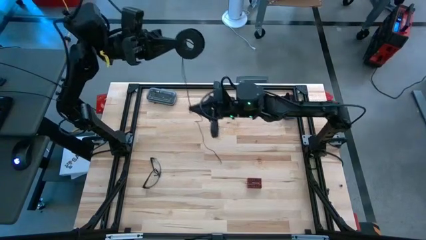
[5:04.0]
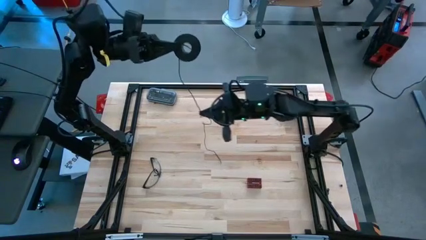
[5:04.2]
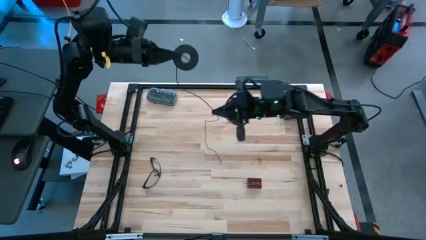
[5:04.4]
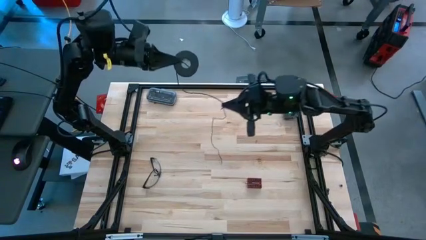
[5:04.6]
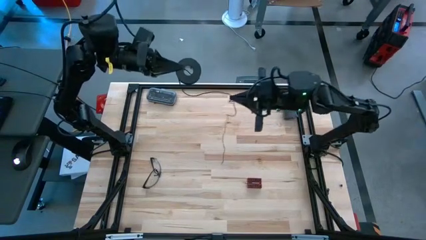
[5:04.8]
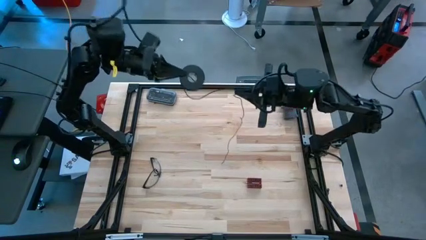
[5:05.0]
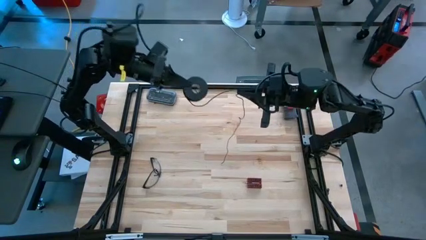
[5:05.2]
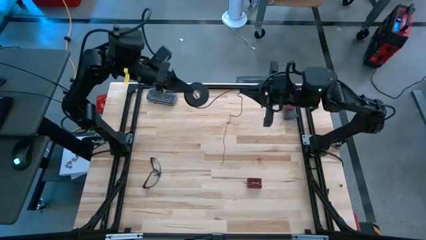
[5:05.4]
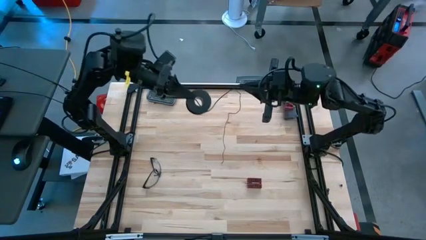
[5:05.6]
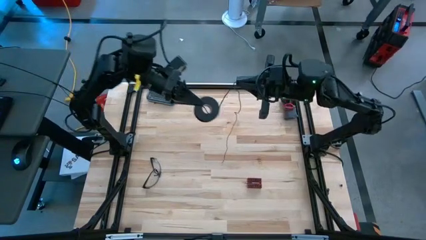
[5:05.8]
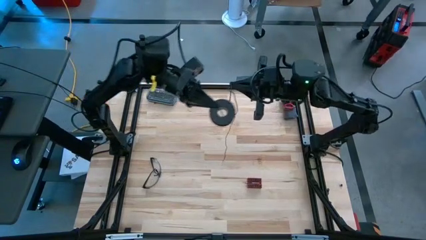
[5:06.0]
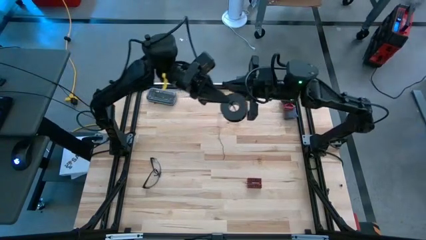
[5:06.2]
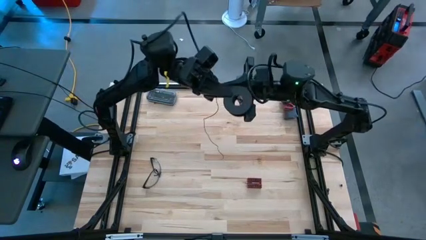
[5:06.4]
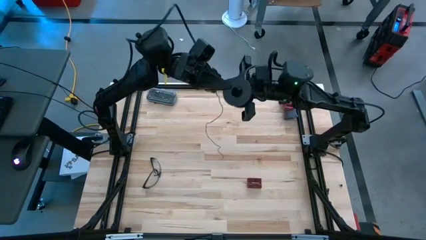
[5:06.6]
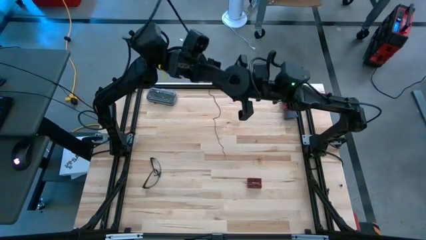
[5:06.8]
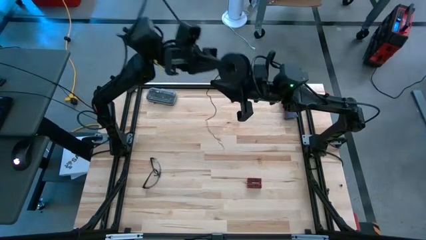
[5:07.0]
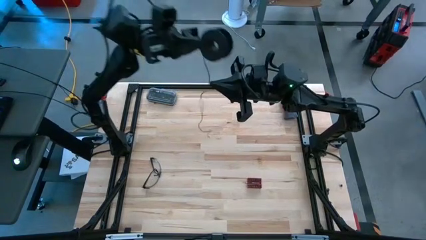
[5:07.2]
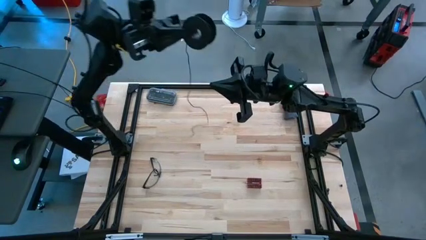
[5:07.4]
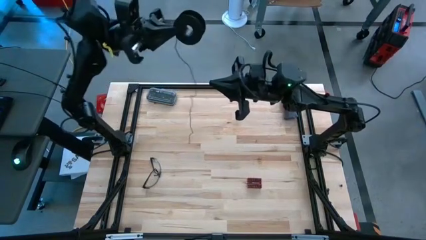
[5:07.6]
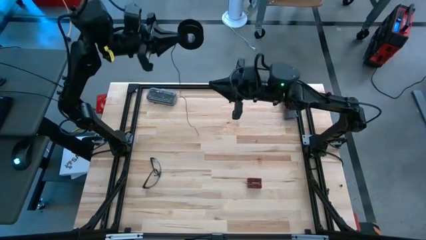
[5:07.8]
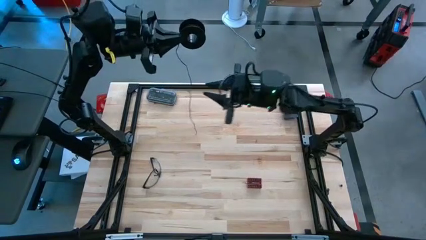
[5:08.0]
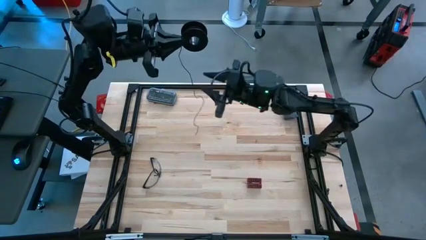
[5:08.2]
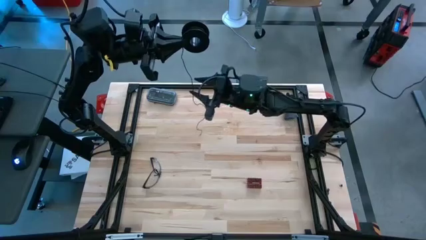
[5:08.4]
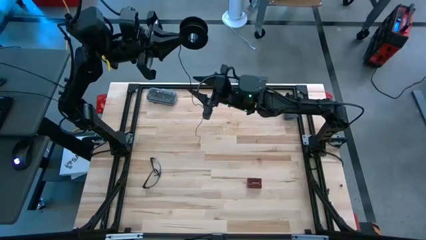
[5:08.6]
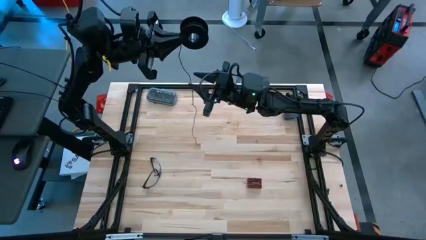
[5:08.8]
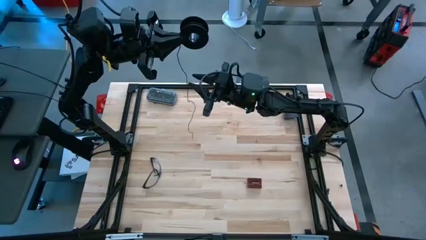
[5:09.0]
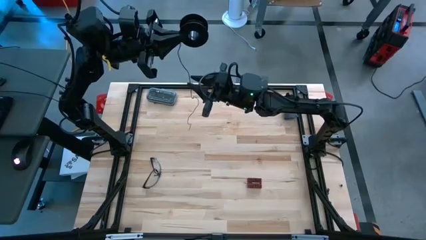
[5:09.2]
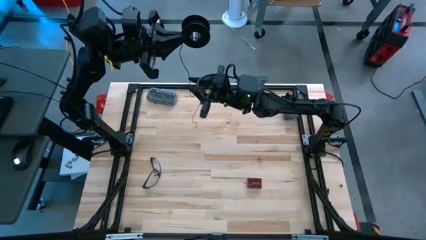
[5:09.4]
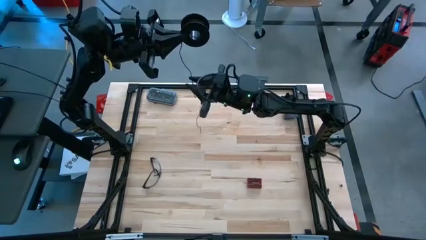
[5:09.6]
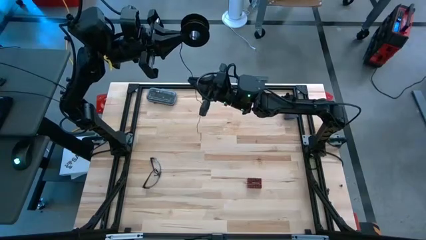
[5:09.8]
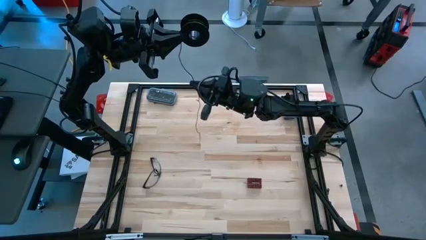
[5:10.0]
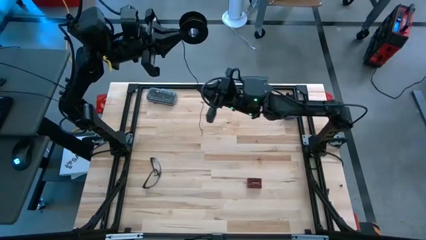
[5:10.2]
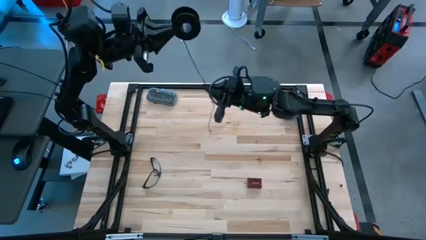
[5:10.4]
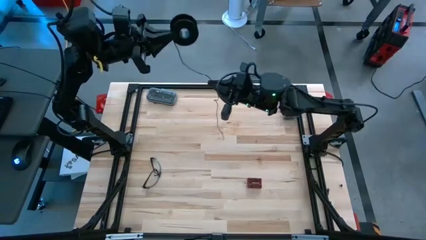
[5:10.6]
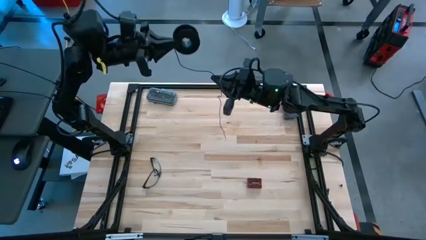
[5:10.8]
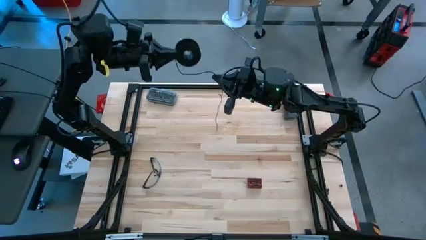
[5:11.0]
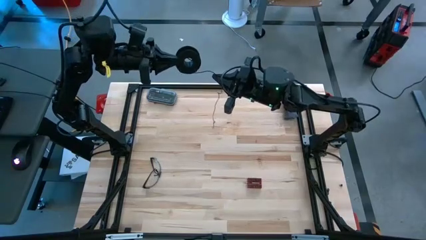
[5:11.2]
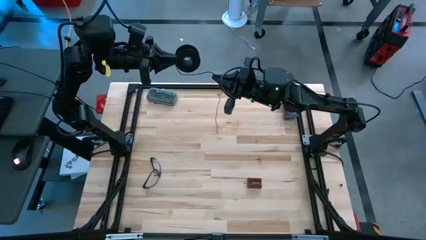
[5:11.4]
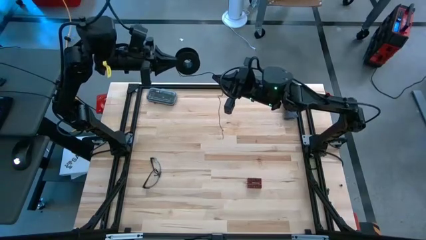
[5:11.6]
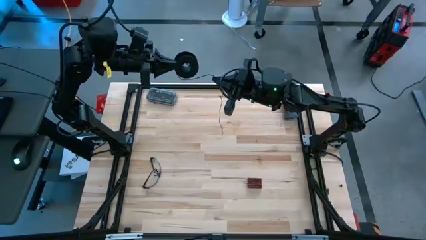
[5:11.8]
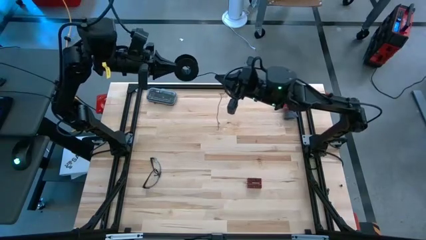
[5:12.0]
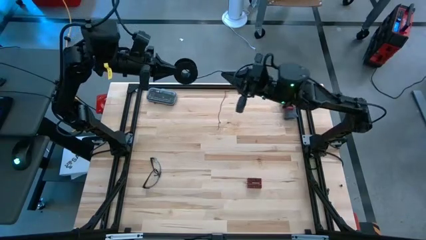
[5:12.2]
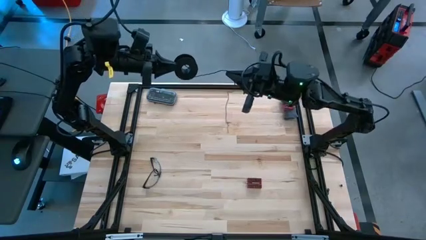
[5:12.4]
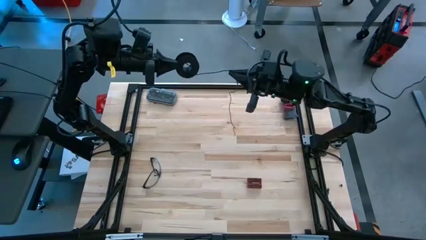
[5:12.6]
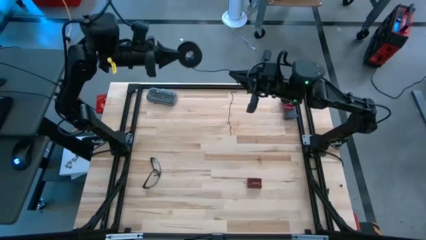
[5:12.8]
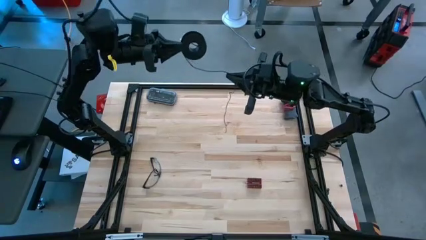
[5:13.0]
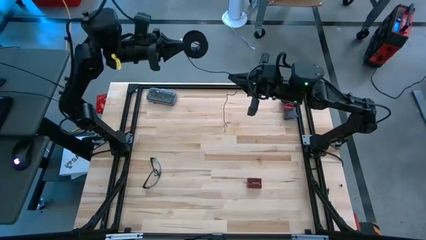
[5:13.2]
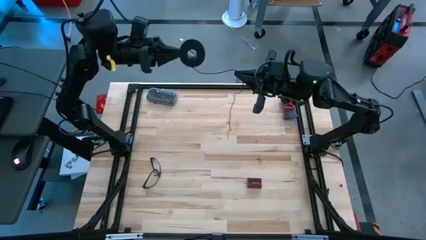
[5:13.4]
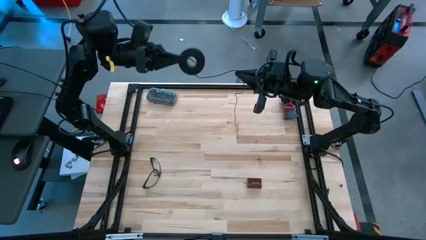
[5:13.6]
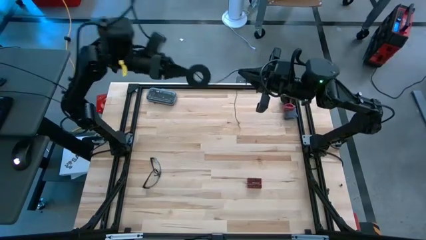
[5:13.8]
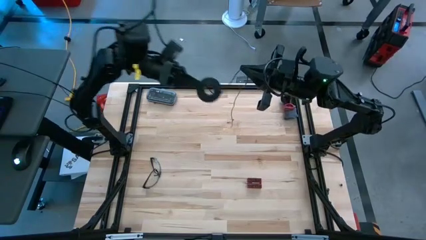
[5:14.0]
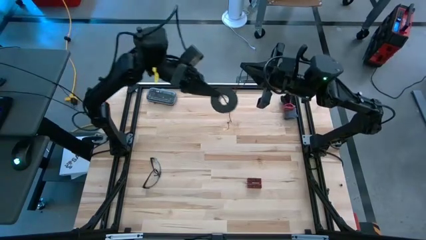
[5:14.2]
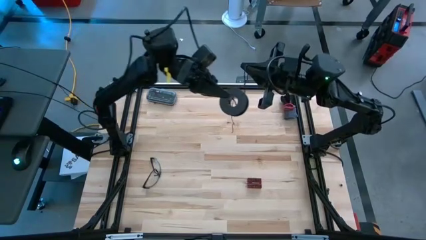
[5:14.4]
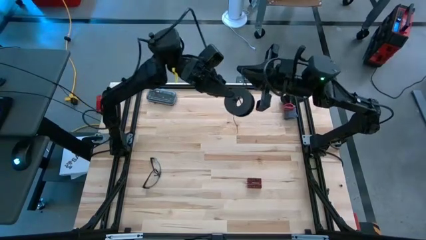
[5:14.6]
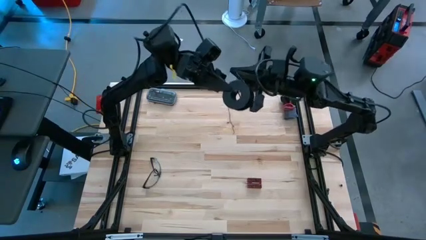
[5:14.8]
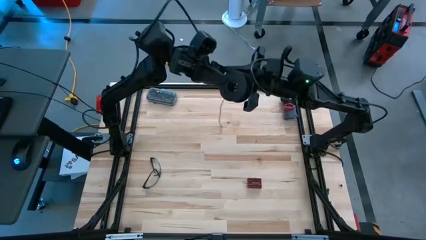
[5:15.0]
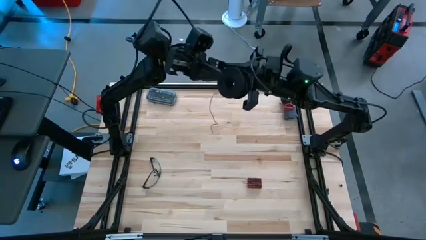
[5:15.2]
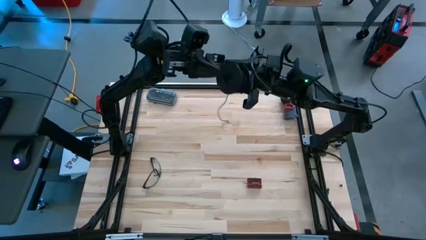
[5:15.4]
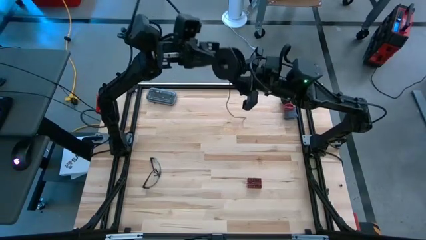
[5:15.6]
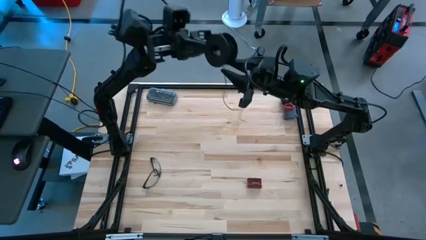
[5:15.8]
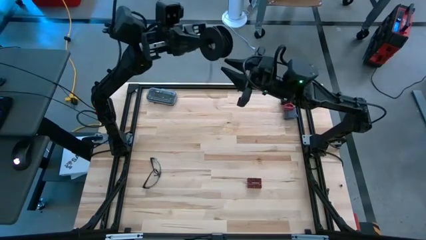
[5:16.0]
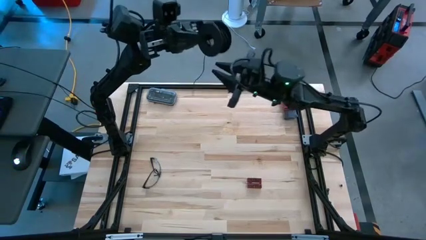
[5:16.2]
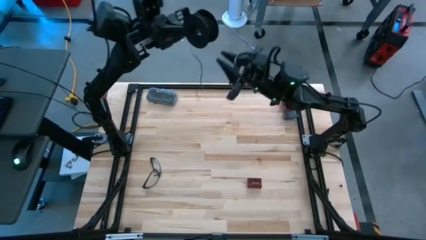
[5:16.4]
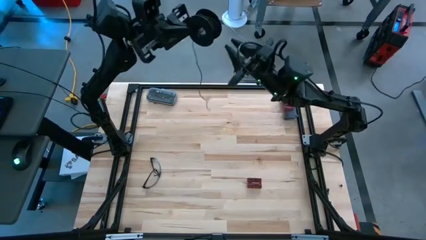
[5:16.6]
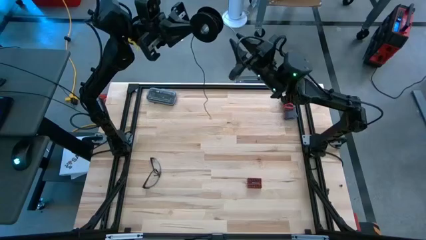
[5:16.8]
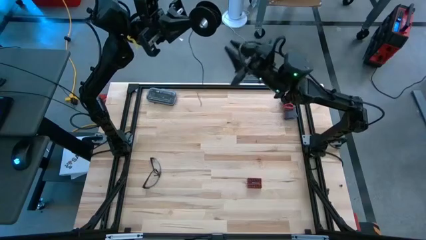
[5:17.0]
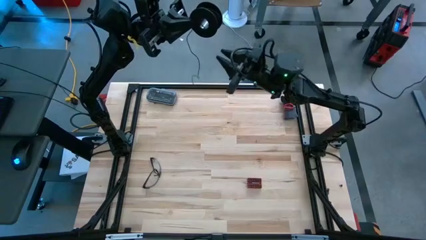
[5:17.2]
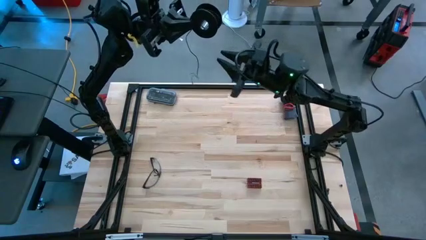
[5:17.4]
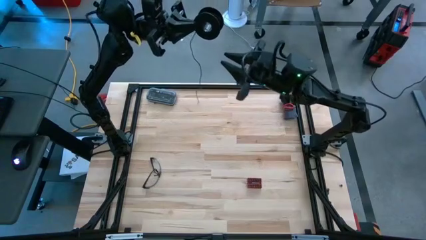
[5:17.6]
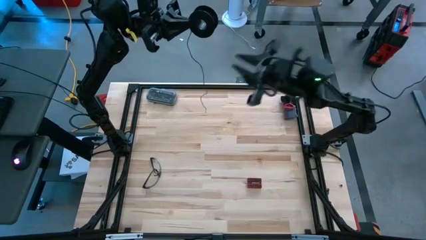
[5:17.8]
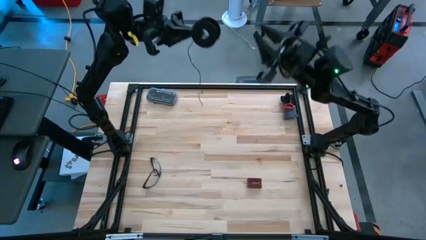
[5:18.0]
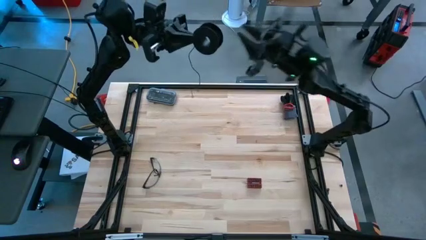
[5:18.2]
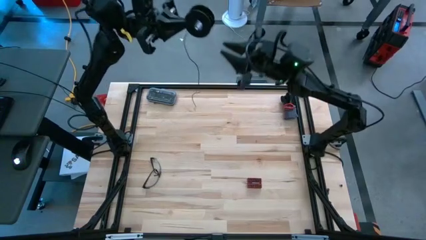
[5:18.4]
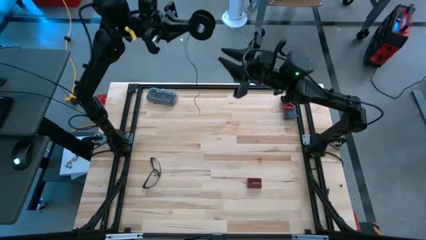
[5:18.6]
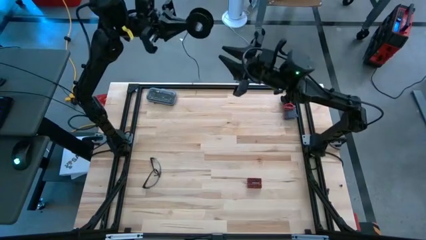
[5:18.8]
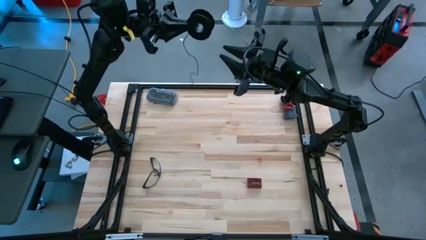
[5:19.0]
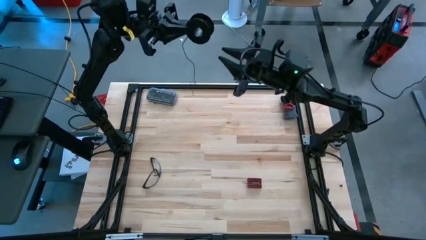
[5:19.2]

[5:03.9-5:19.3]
Task: Coil cords
Coil the black wire into the spool
